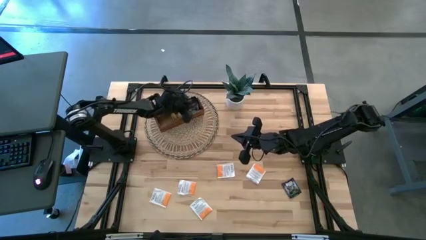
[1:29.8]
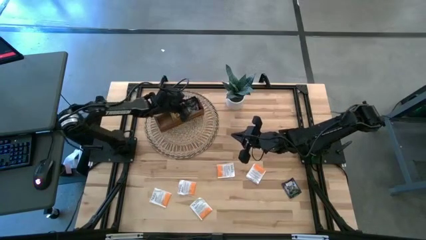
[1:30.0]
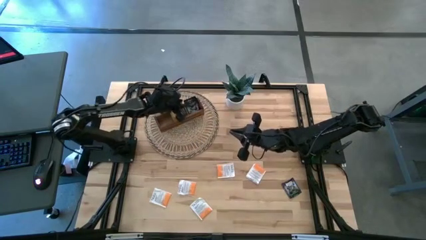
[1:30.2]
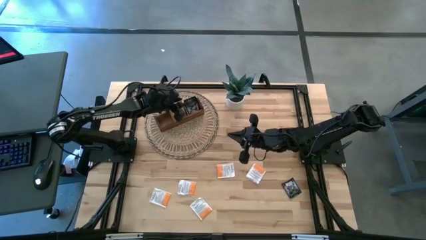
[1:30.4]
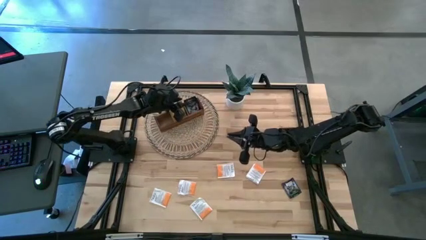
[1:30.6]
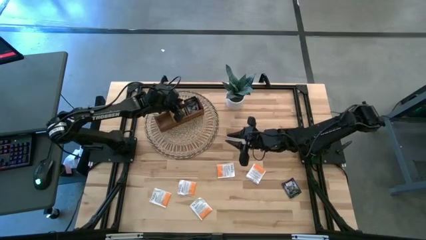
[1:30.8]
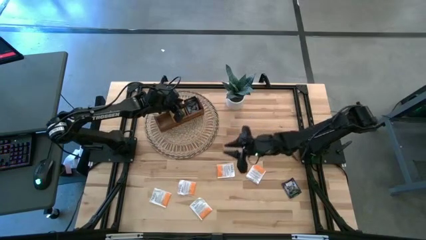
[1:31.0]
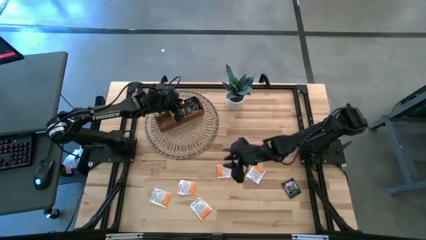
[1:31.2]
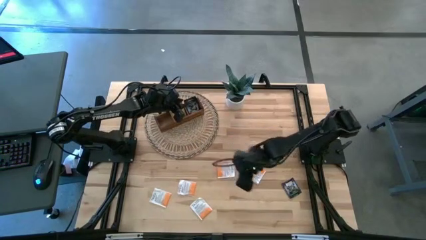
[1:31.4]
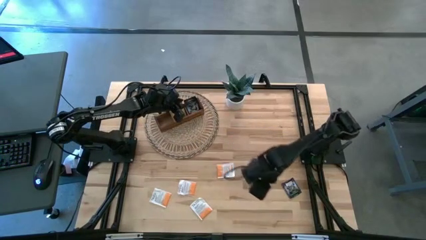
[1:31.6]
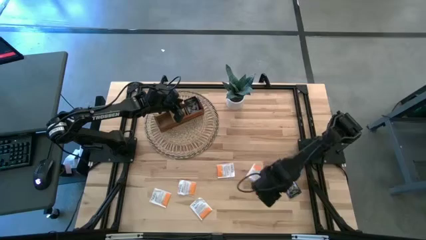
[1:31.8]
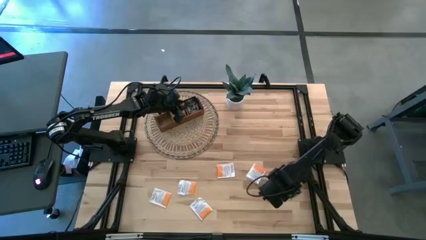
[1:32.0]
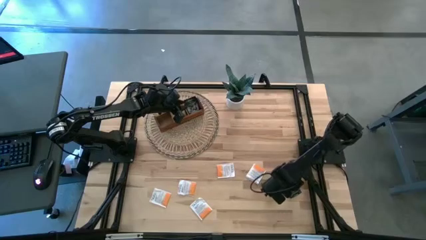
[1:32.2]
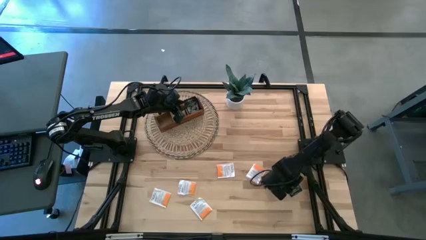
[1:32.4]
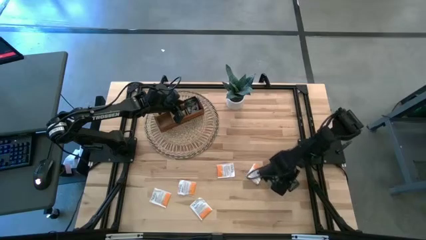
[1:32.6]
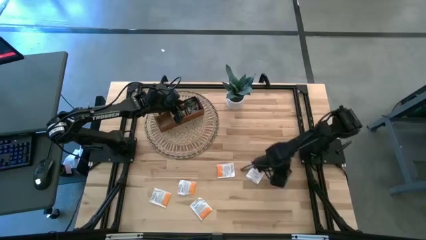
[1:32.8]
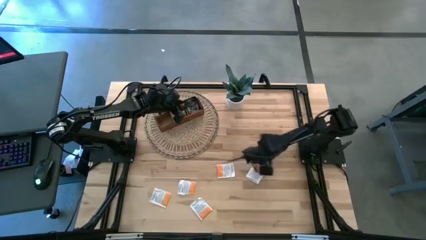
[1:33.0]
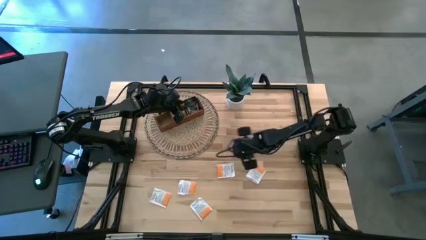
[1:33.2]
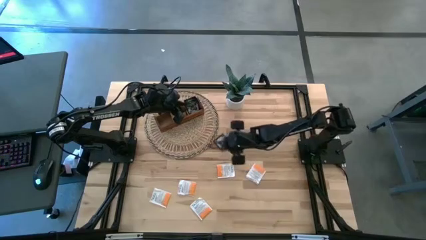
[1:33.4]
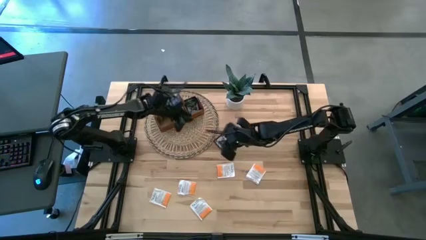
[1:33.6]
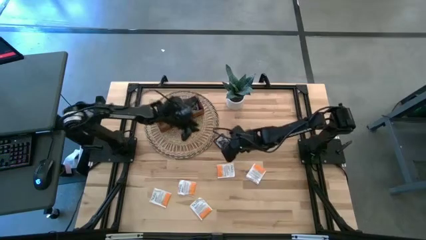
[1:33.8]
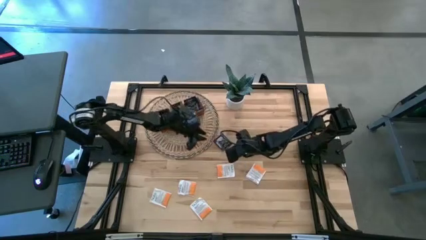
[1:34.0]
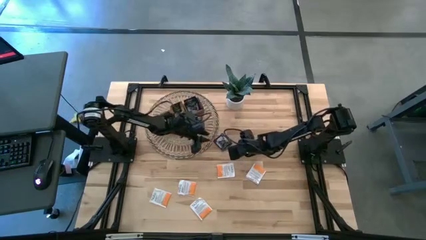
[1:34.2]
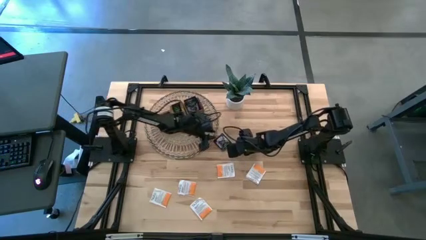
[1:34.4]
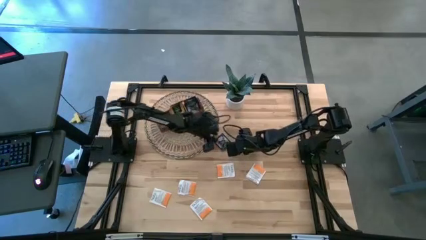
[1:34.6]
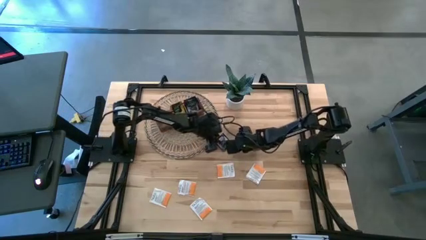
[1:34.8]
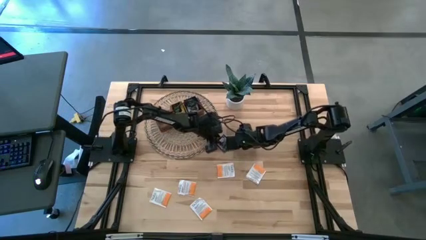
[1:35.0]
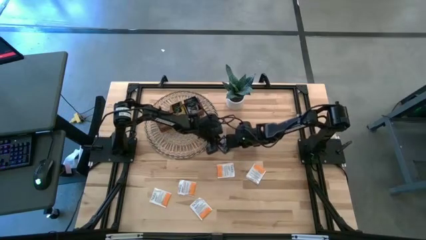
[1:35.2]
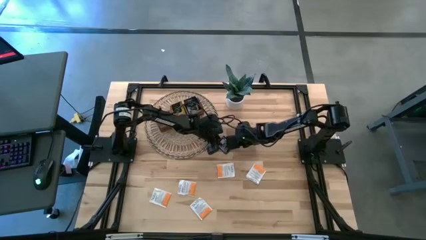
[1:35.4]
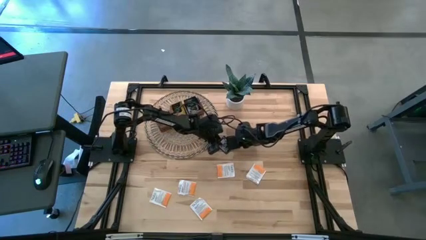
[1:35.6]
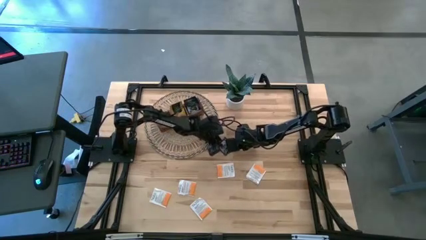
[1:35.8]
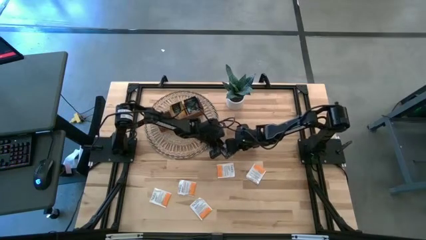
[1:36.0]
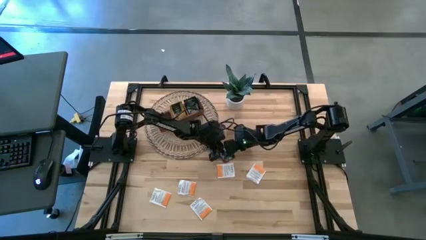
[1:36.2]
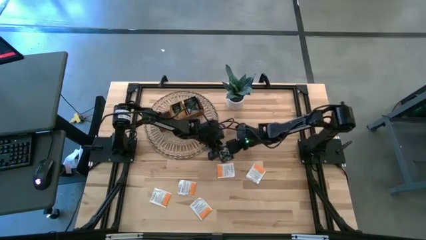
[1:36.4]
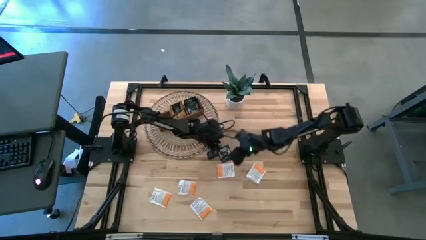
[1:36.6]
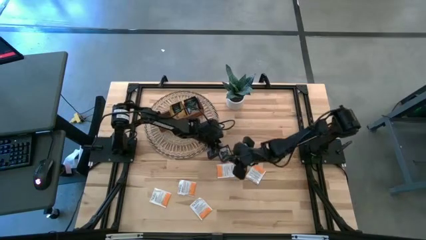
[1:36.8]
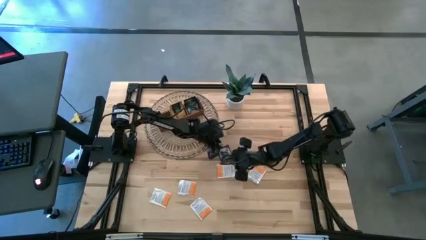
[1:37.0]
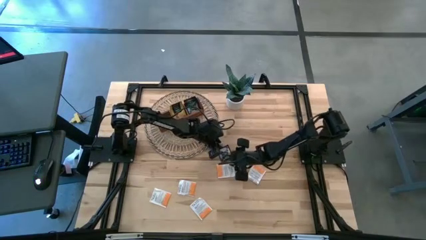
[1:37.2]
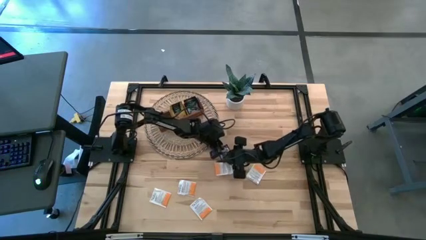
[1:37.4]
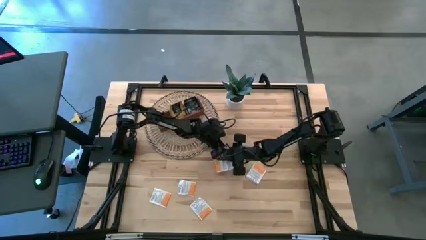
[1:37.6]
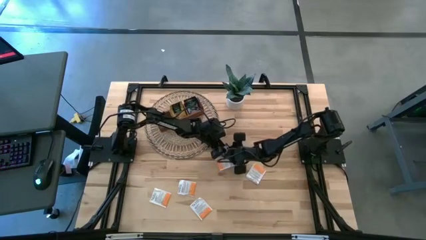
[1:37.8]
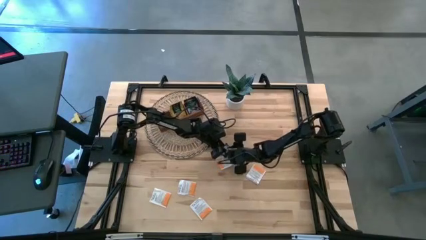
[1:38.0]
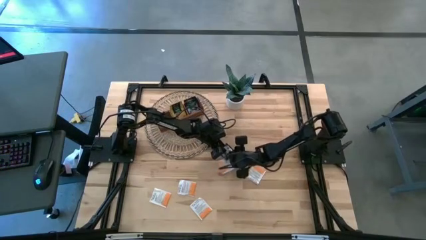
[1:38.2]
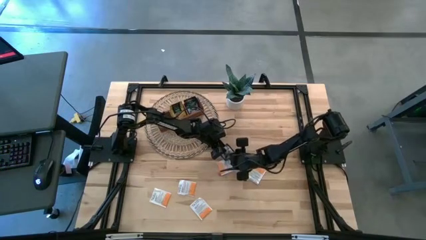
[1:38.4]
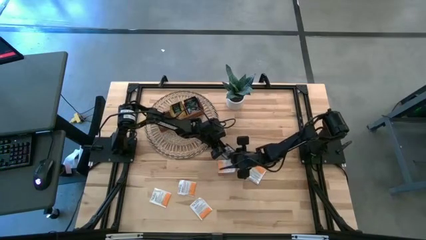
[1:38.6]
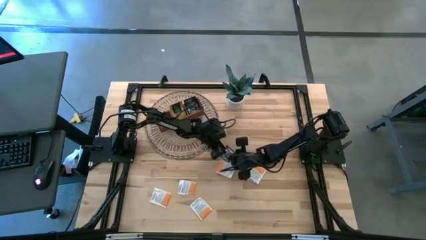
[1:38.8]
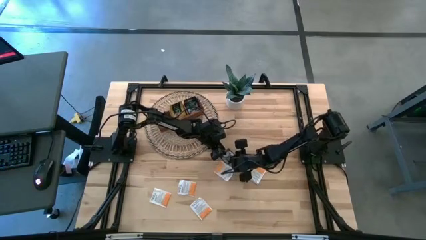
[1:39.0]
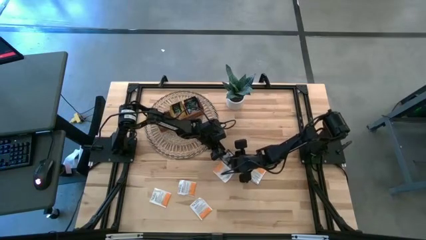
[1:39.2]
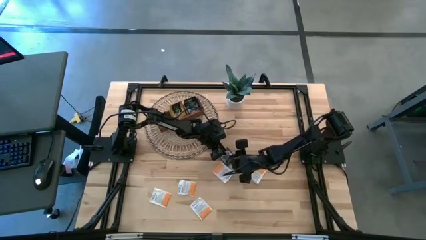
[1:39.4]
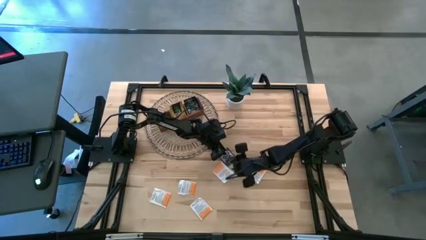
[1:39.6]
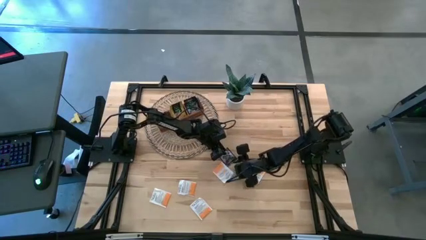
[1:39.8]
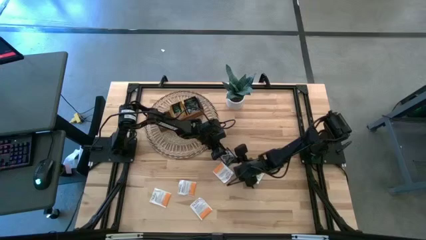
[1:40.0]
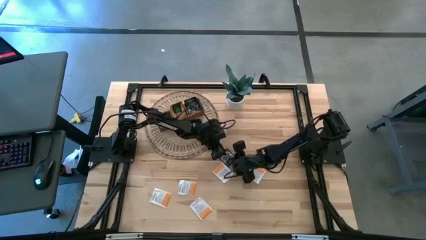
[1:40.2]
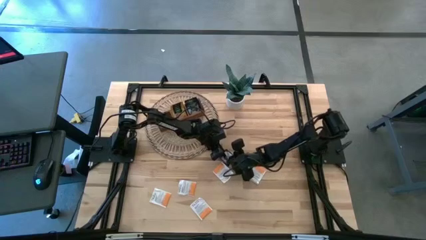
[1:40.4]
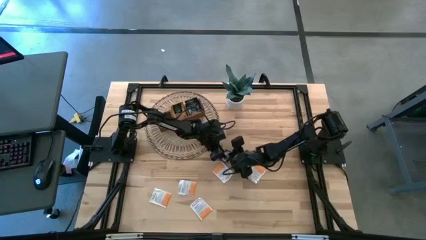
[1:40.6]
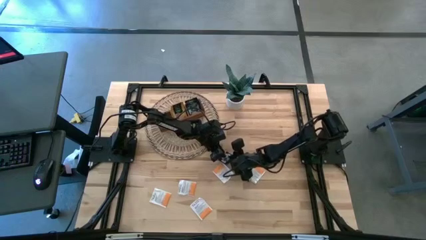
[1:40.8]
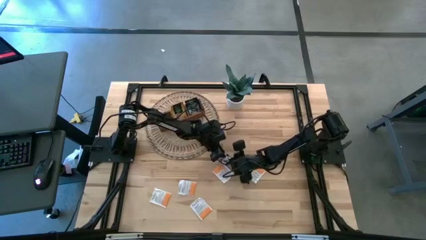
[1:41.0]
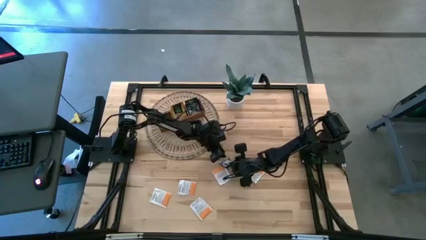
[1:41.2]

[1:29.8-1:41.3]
Task: Pick & Place Tea
Put the black tea bag into the right section of the wooden organizer
